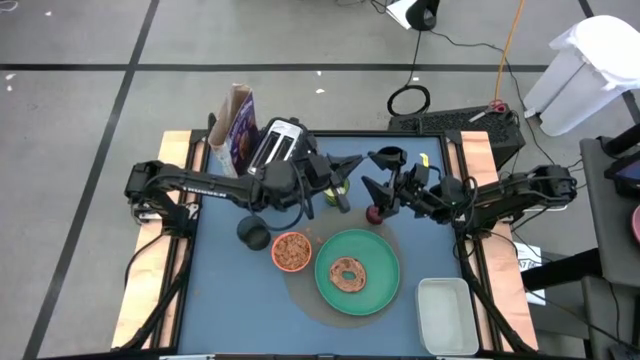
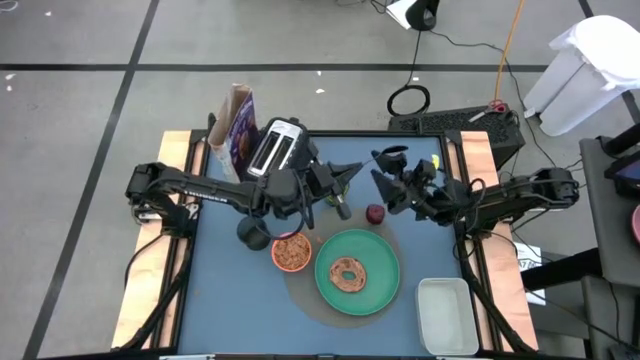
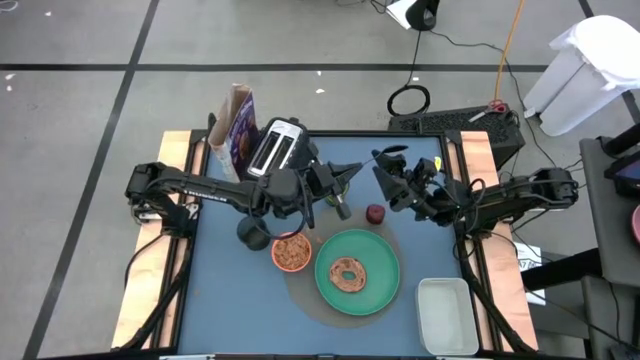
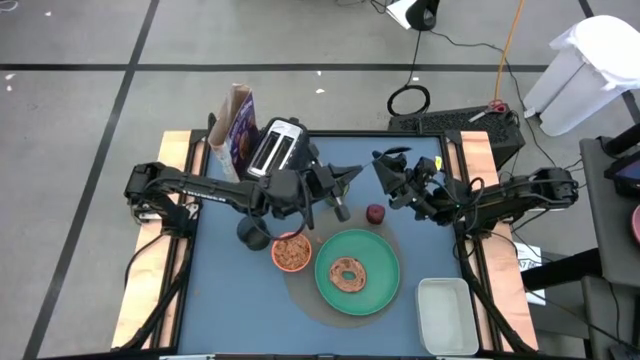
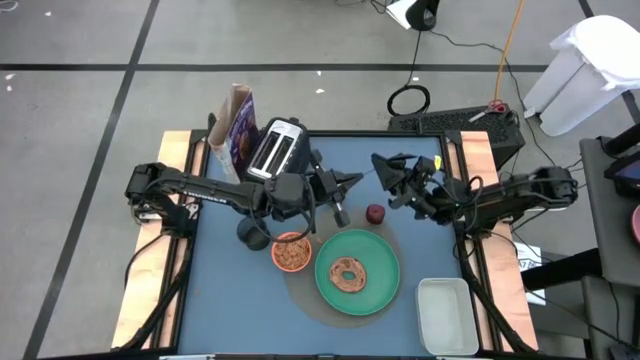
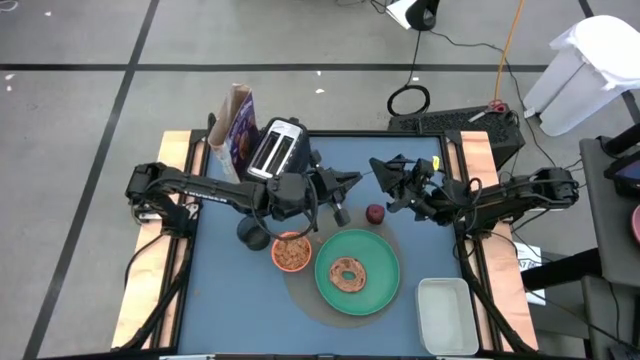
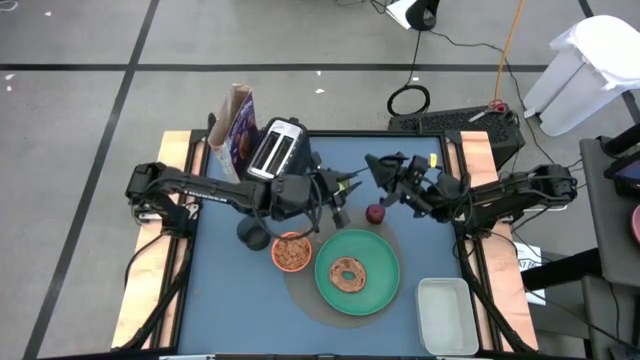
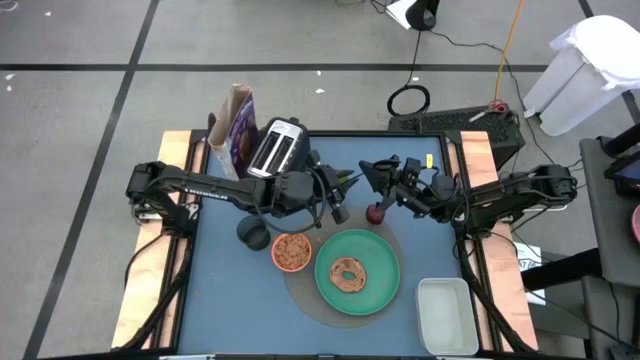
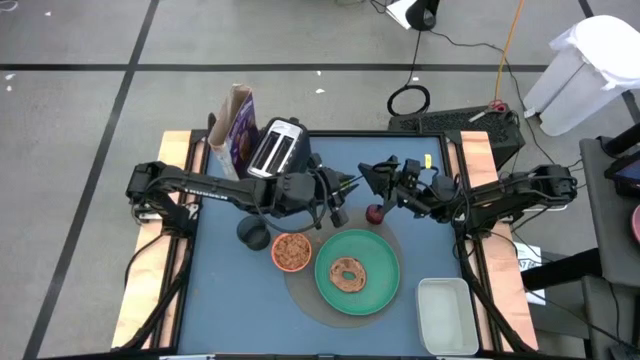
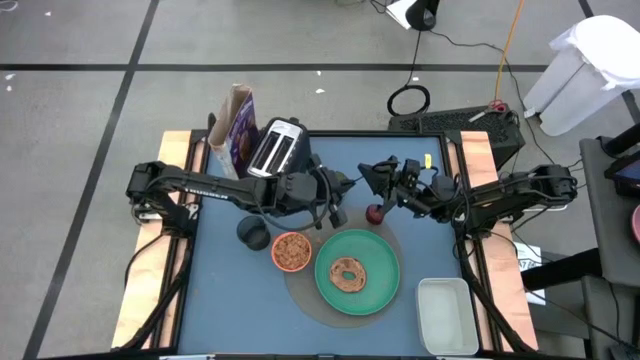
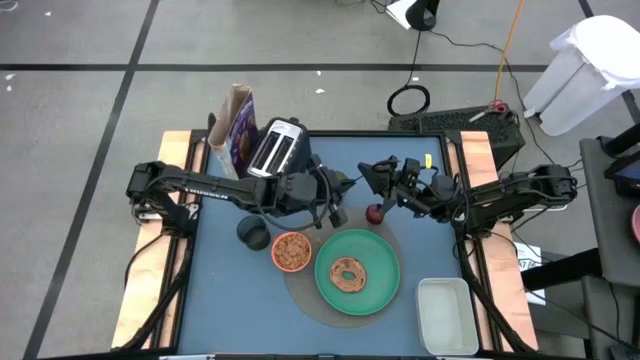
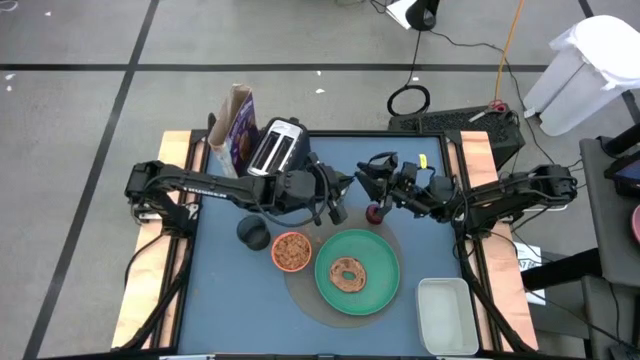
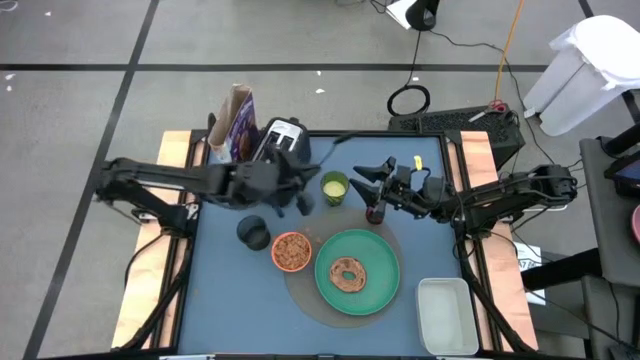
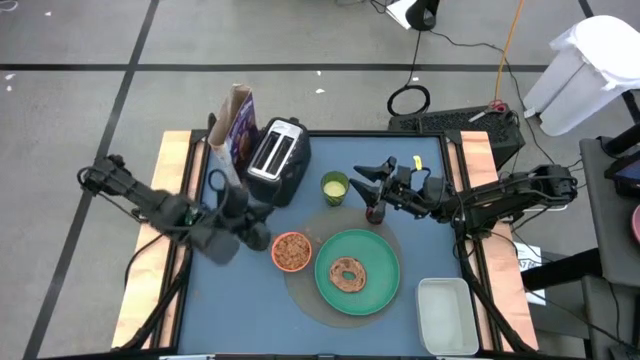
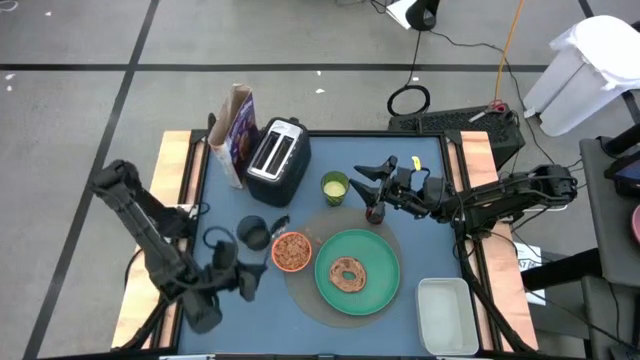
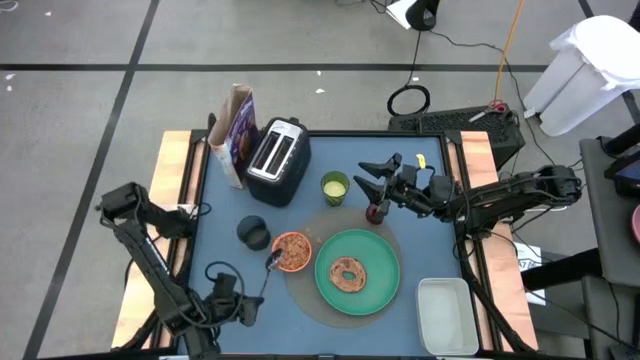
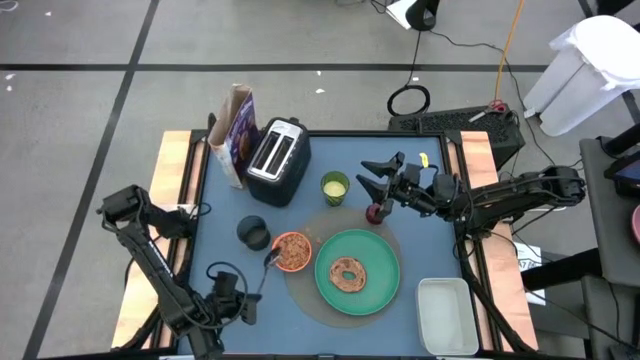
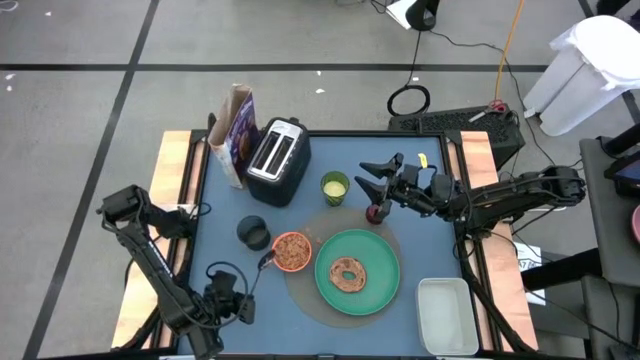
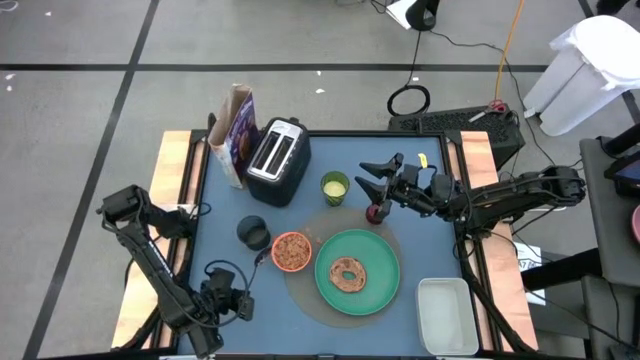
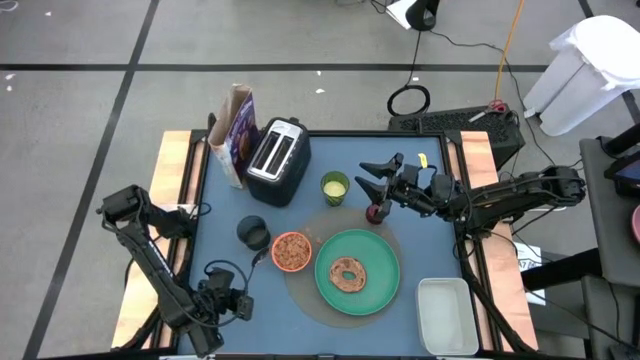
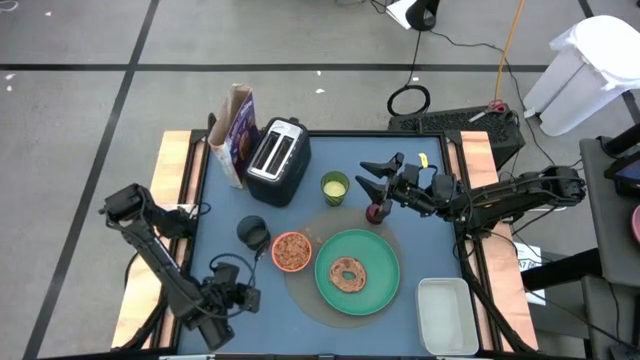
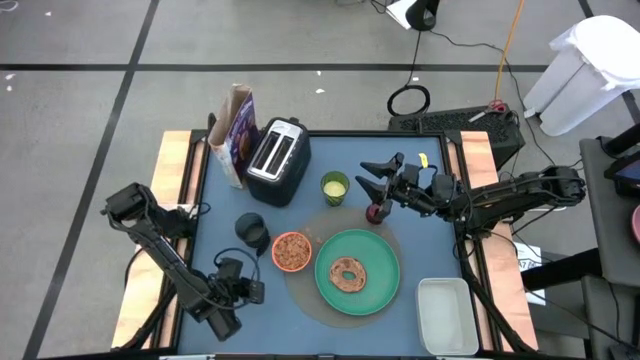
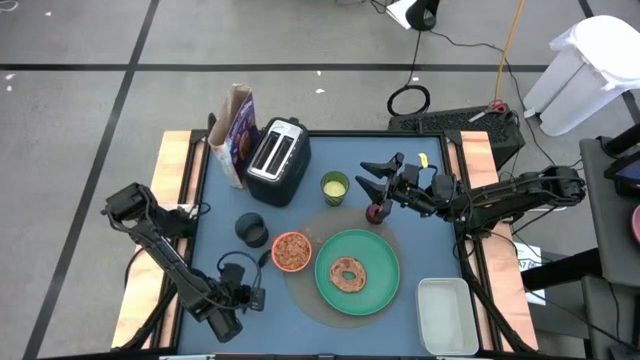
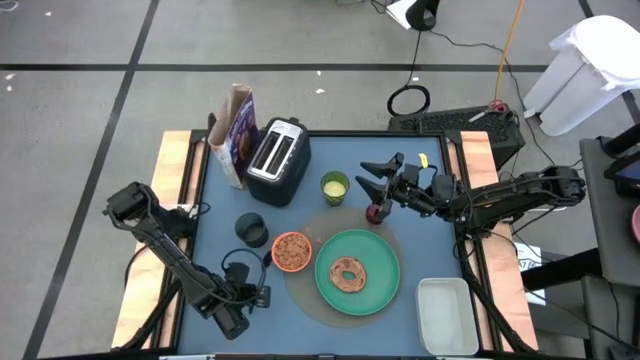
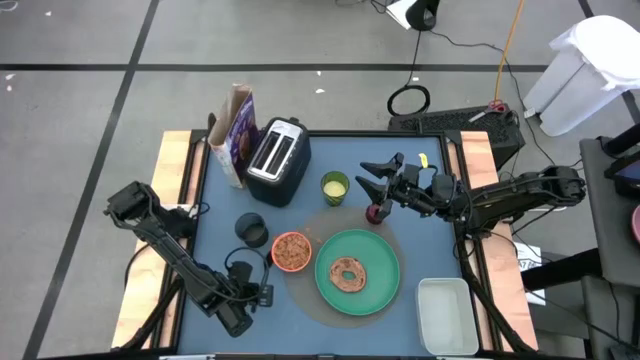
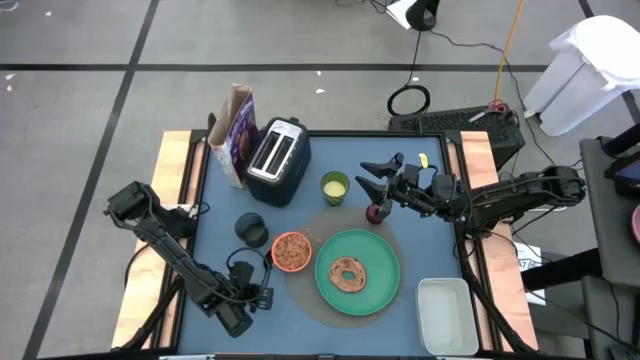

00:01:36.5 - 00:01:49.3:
Task: Arrange a breakfast setting
Put the spoon beside the orange bowl

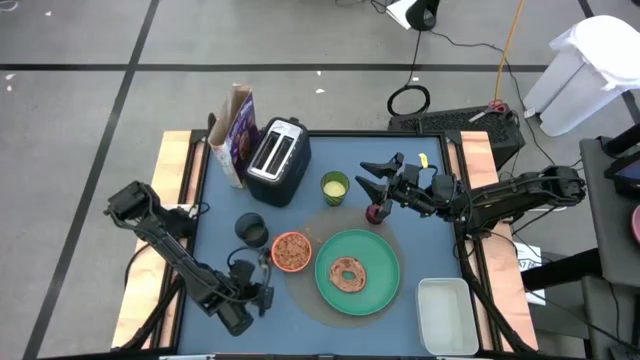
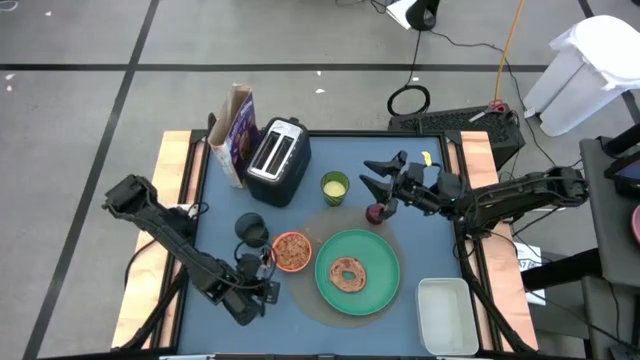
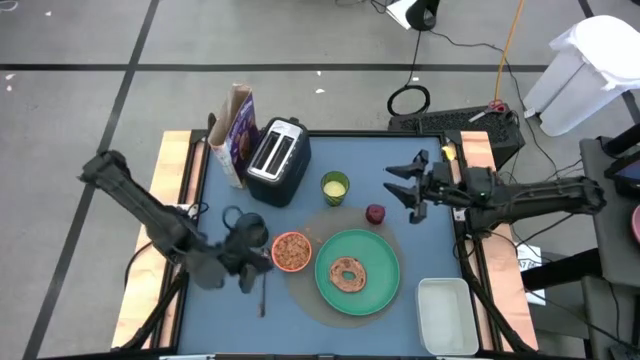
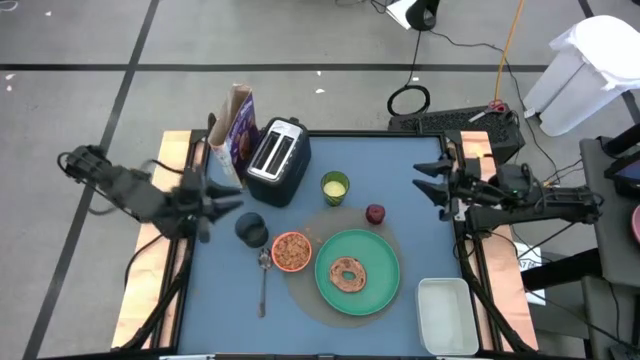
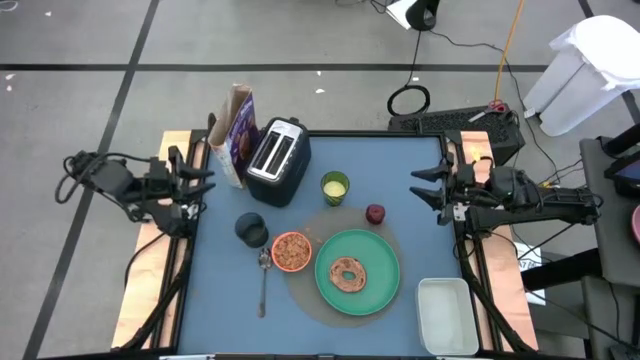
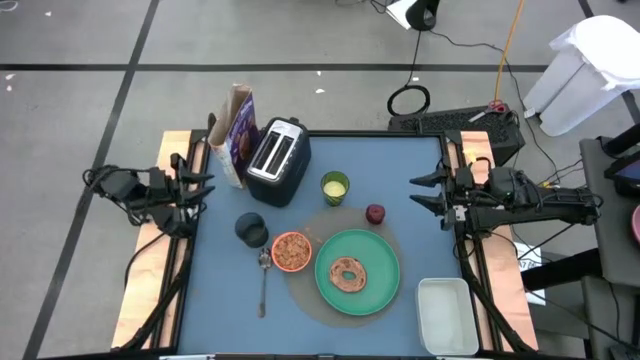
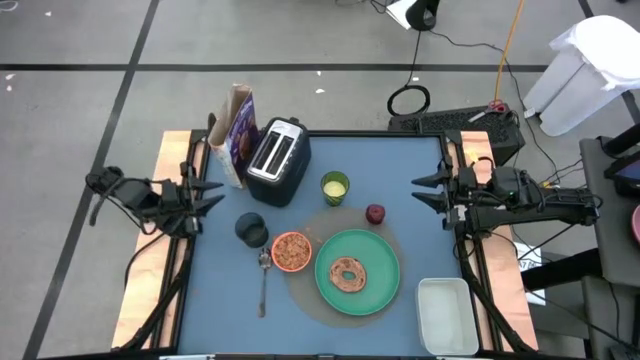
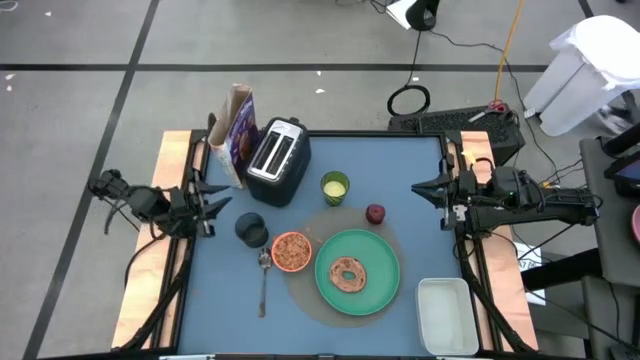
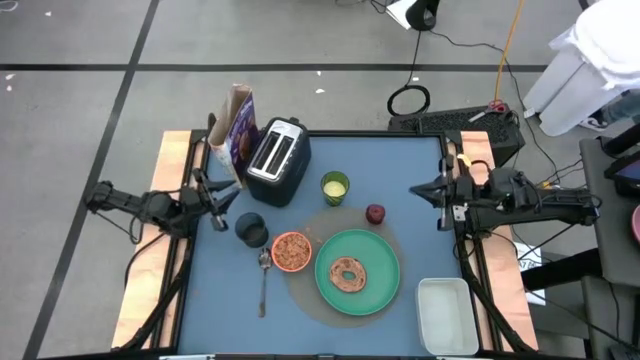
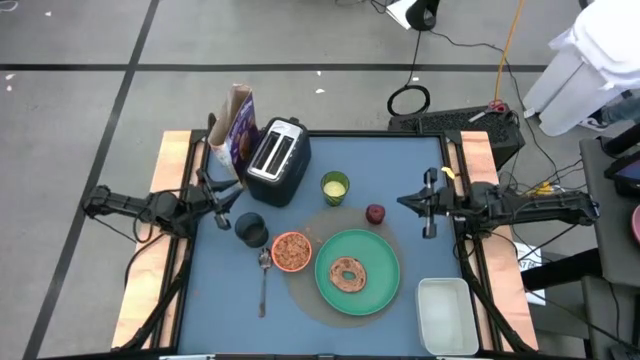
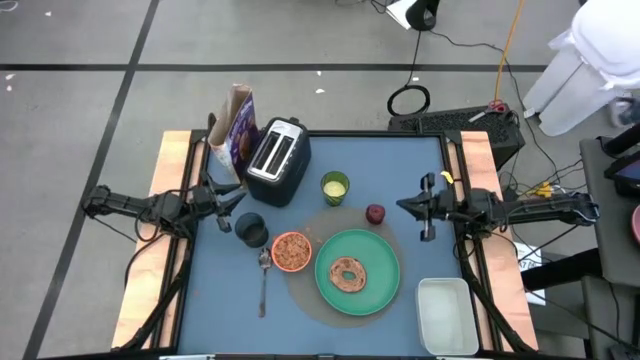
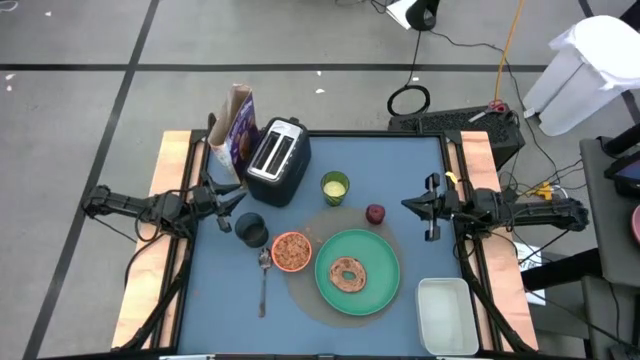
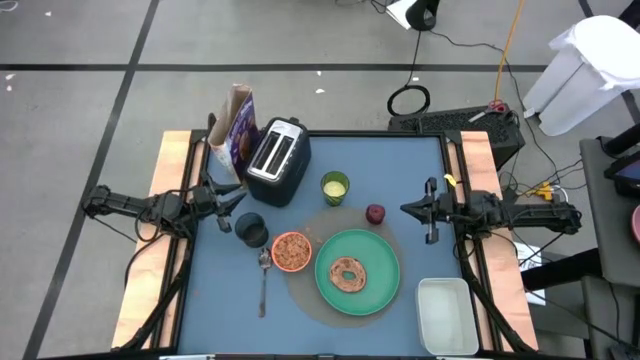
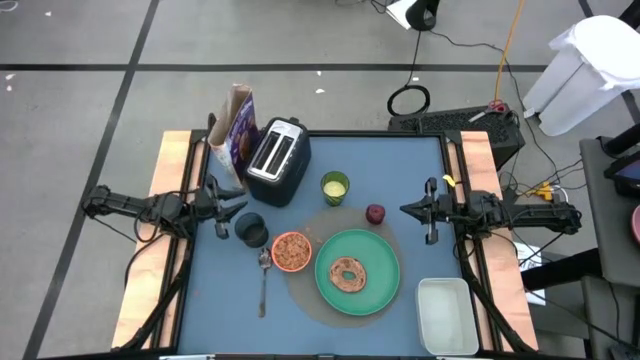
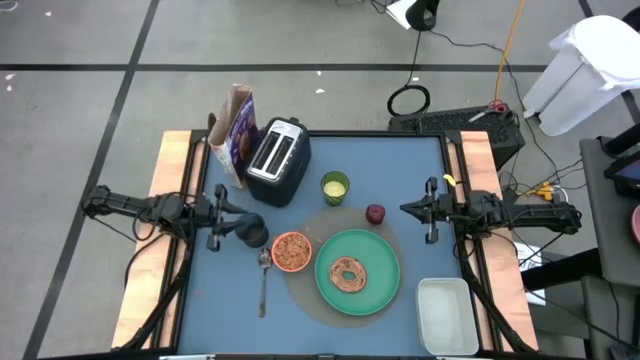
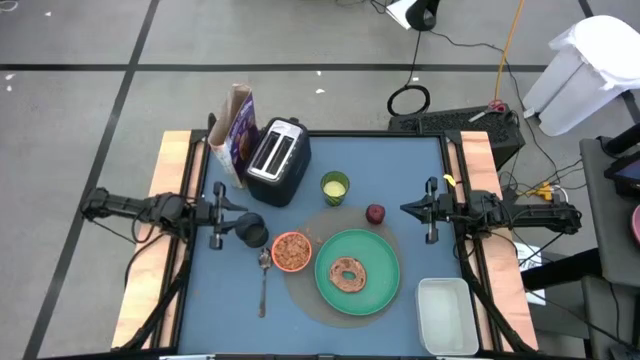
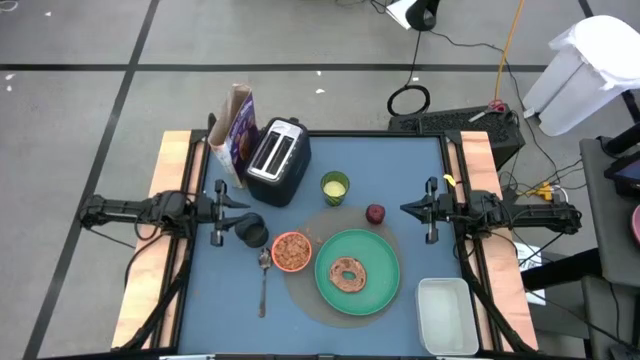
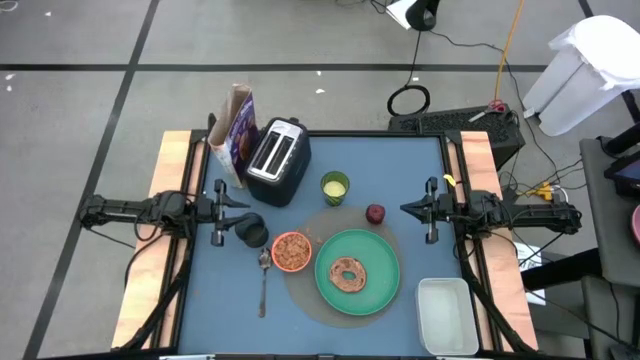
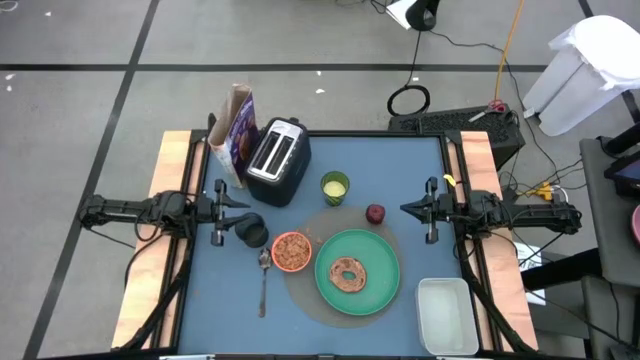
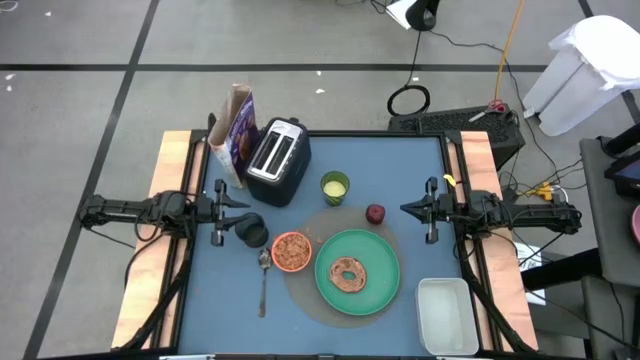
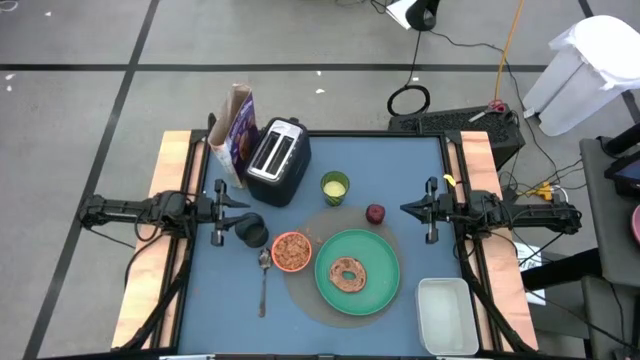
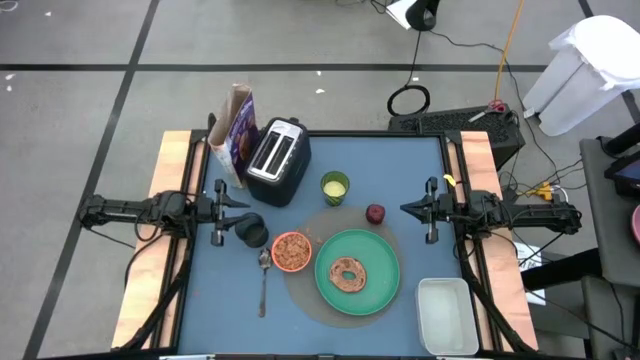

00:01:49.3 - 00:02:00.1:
Return to Home Position
